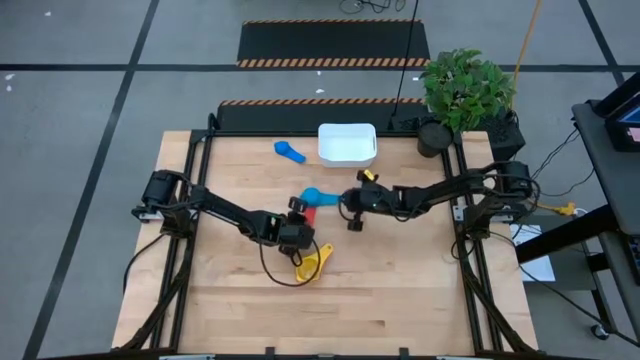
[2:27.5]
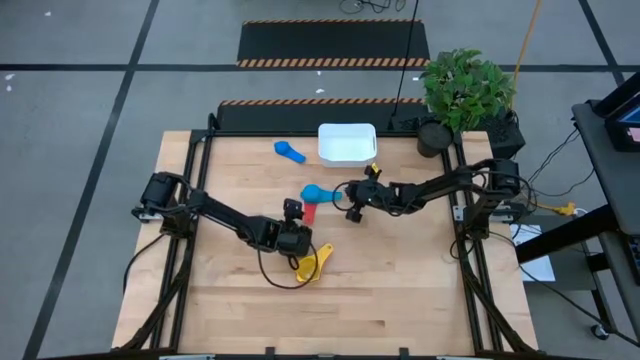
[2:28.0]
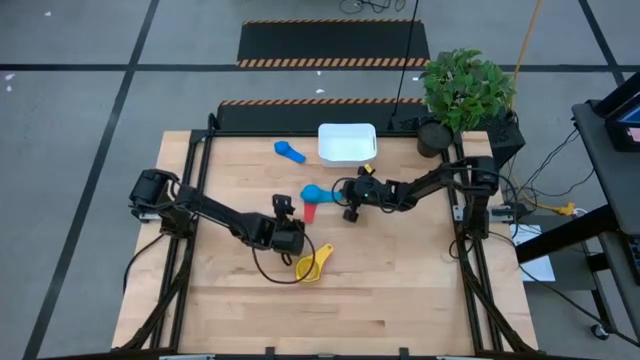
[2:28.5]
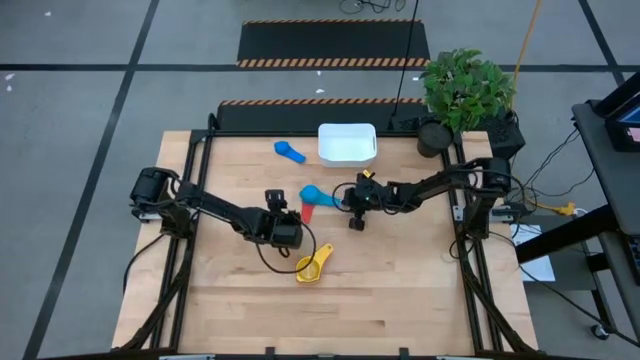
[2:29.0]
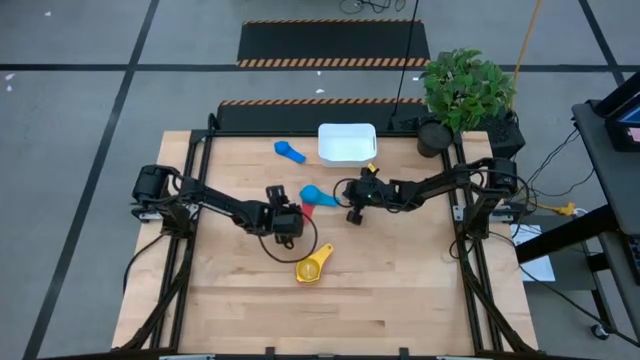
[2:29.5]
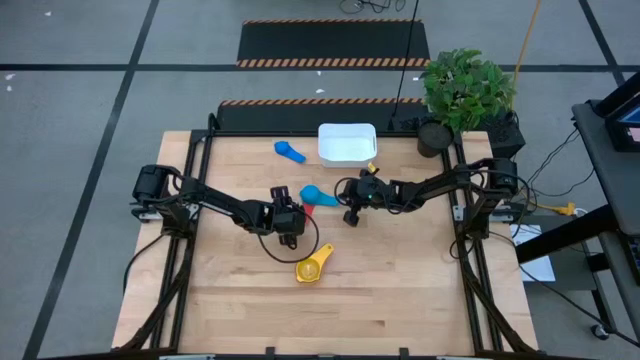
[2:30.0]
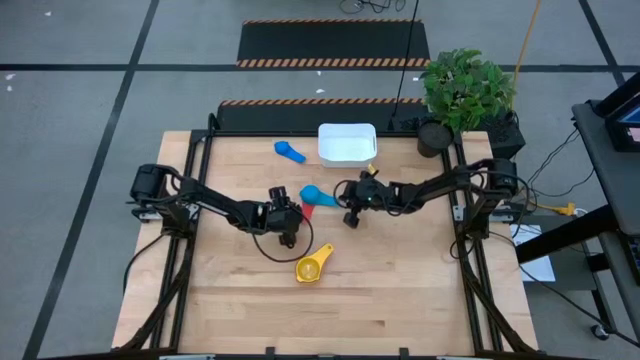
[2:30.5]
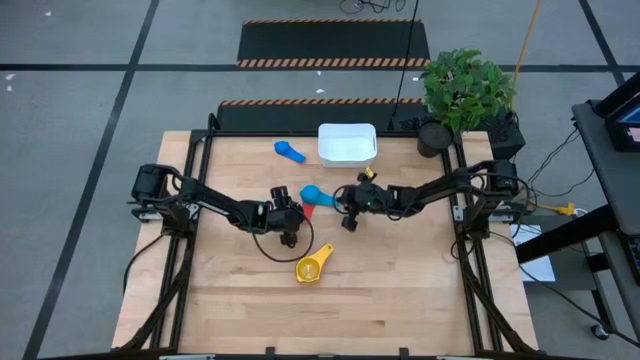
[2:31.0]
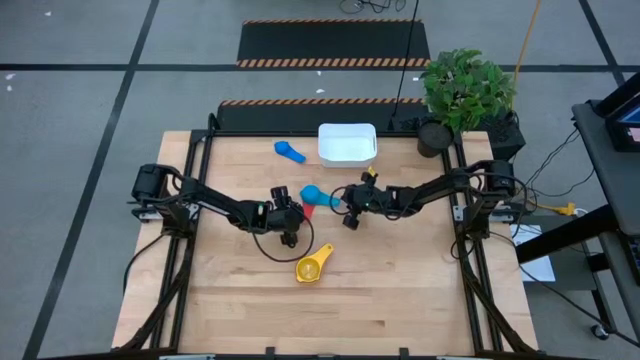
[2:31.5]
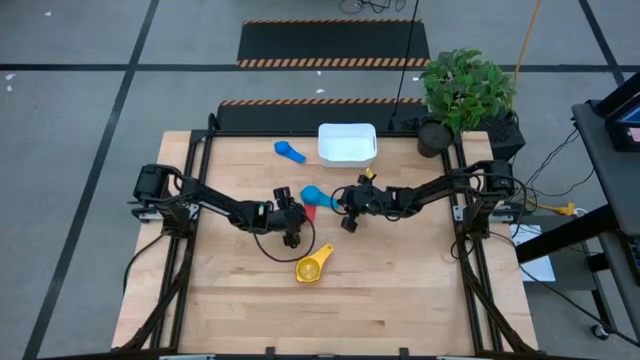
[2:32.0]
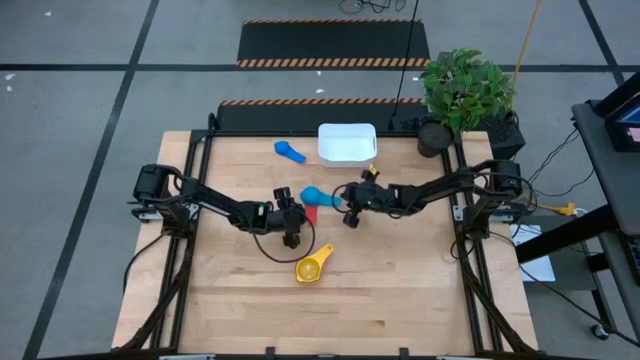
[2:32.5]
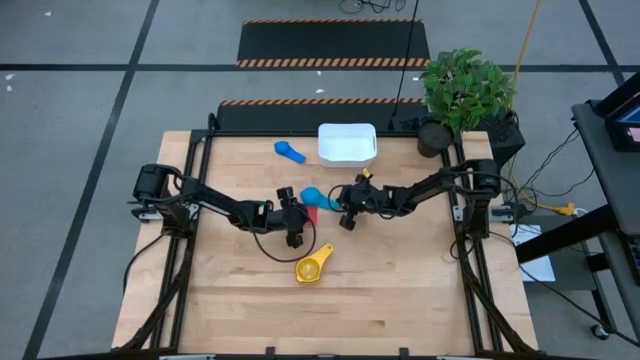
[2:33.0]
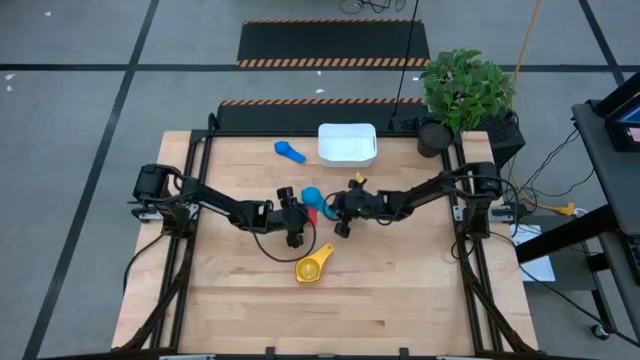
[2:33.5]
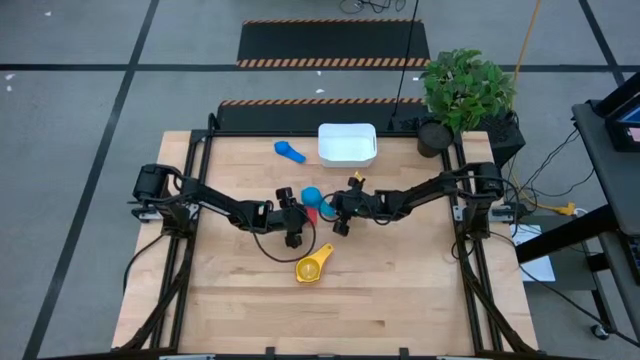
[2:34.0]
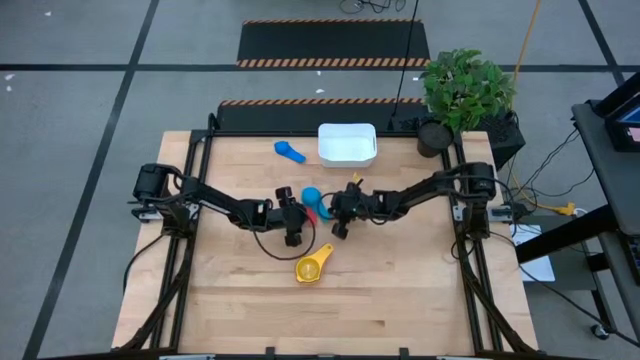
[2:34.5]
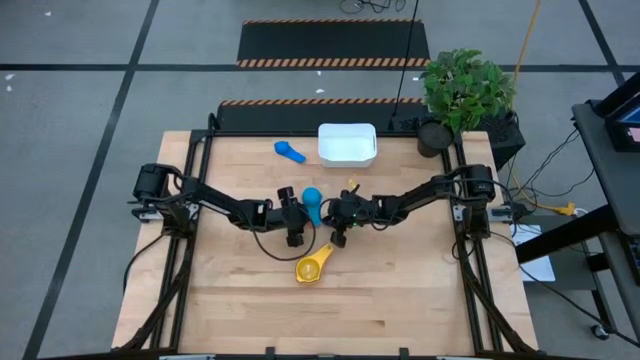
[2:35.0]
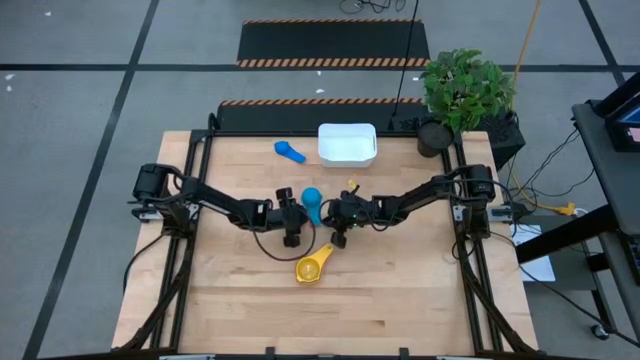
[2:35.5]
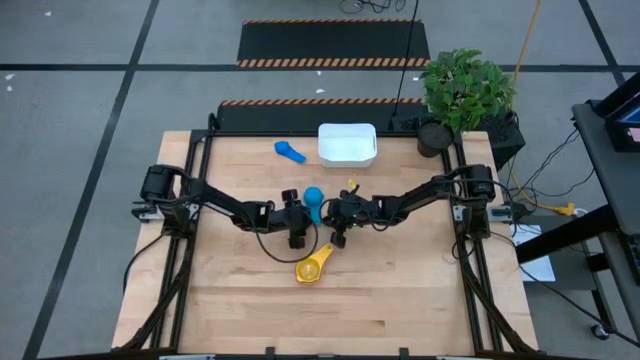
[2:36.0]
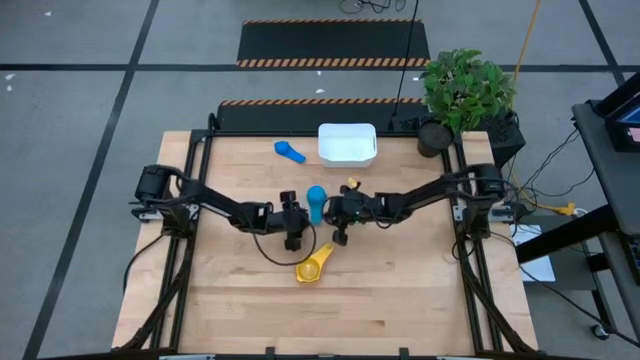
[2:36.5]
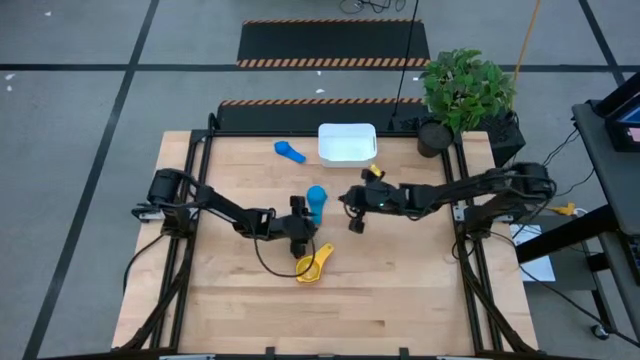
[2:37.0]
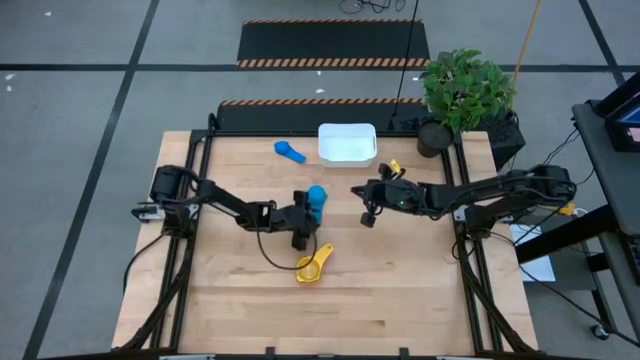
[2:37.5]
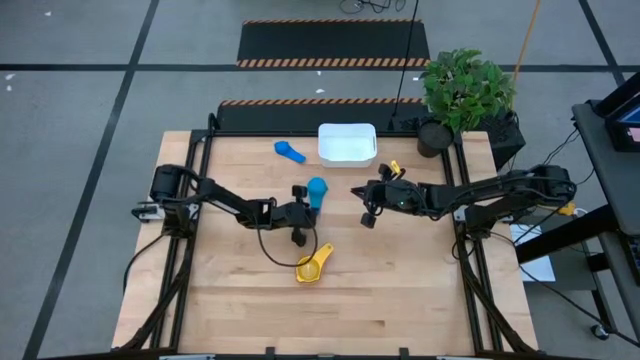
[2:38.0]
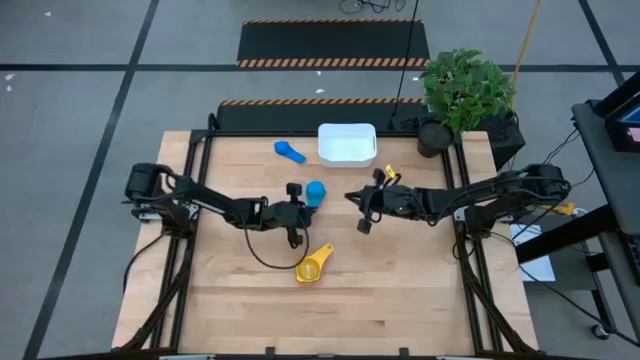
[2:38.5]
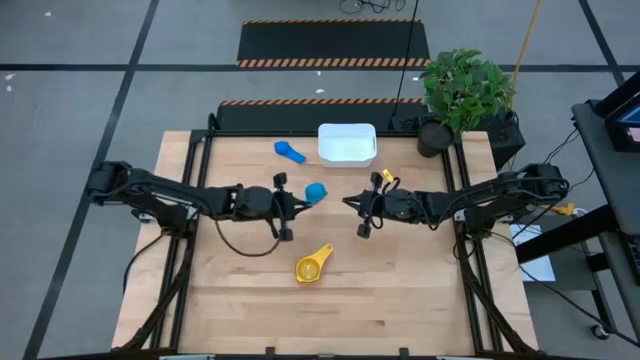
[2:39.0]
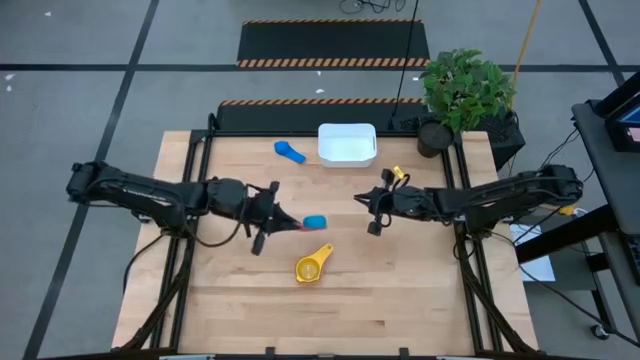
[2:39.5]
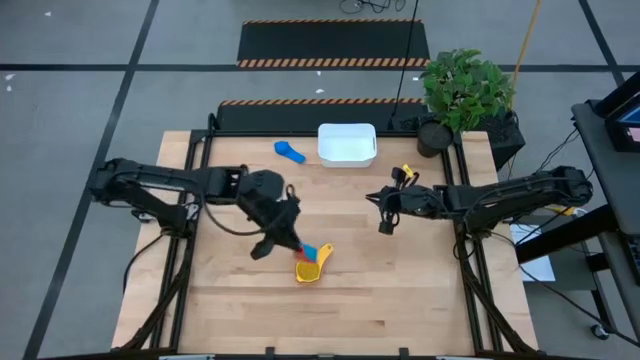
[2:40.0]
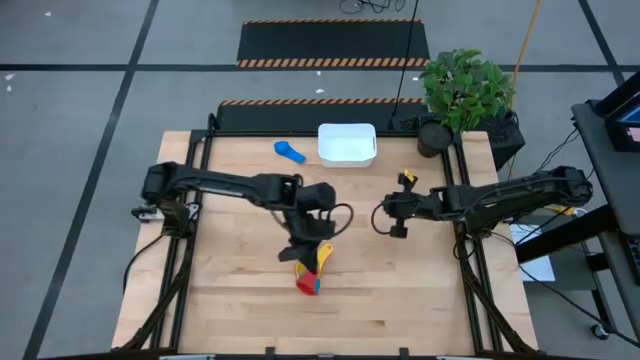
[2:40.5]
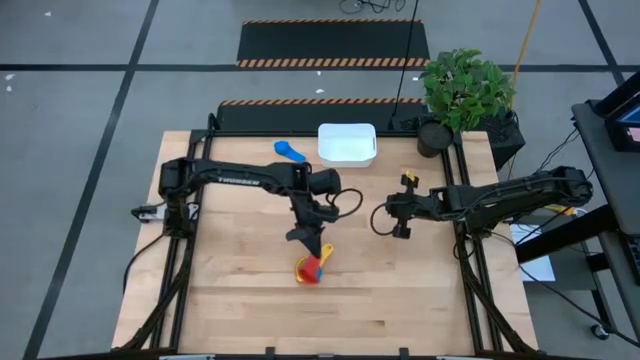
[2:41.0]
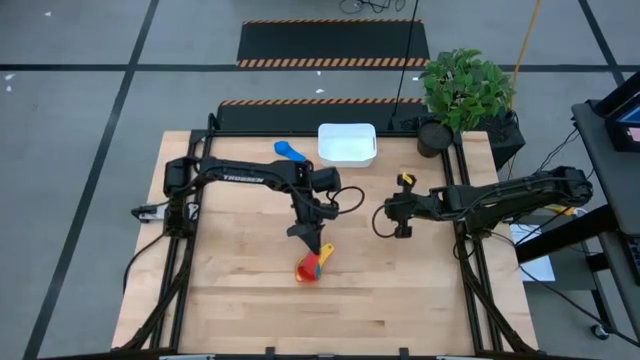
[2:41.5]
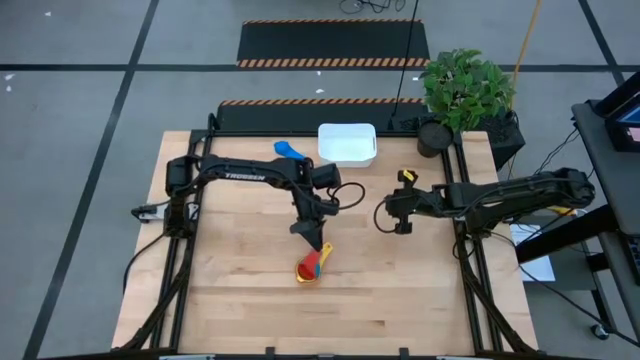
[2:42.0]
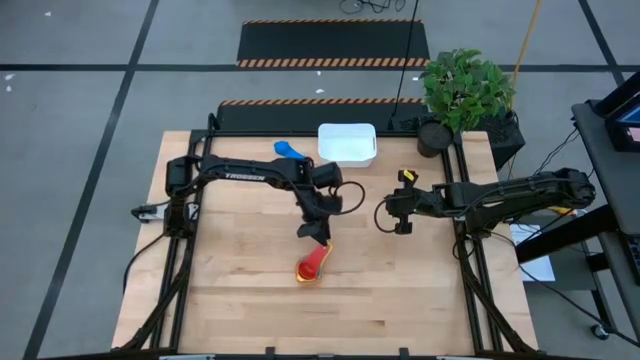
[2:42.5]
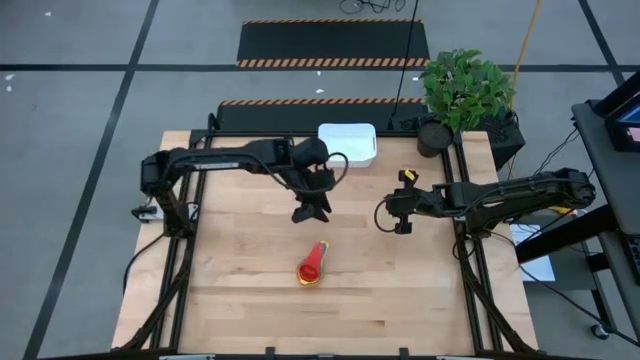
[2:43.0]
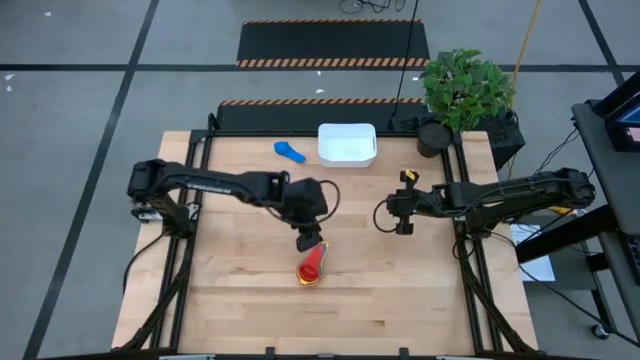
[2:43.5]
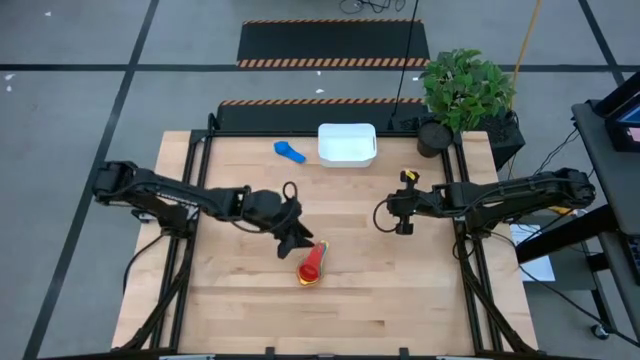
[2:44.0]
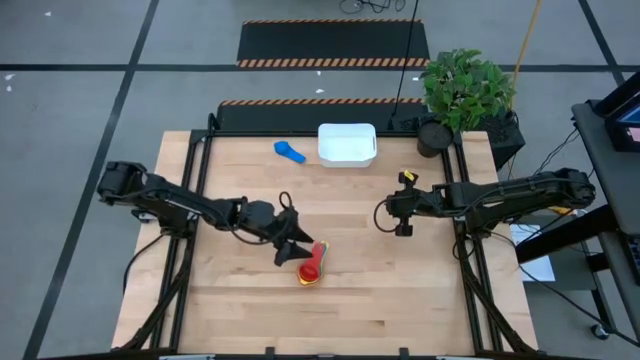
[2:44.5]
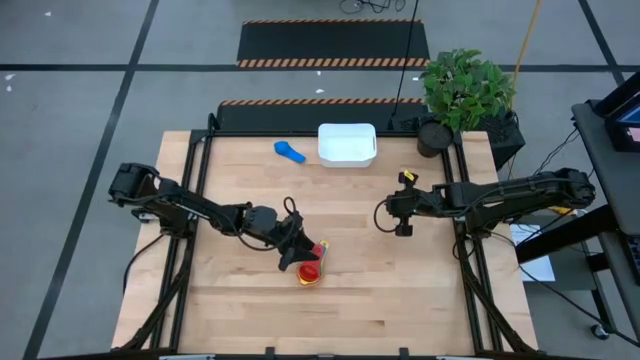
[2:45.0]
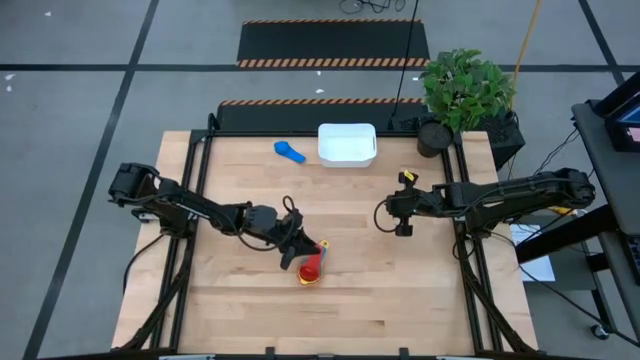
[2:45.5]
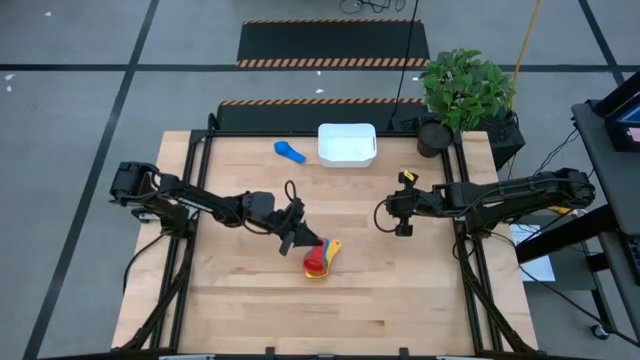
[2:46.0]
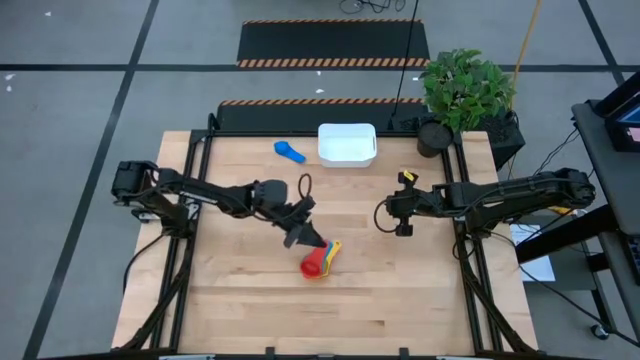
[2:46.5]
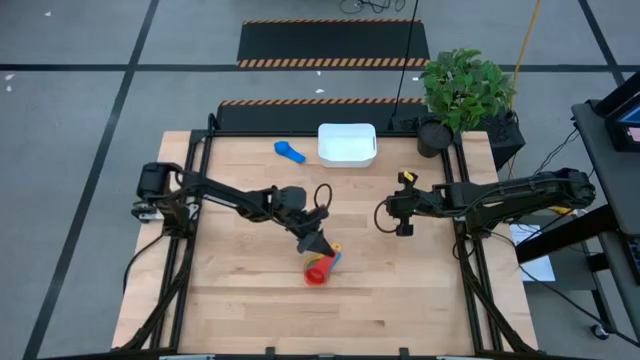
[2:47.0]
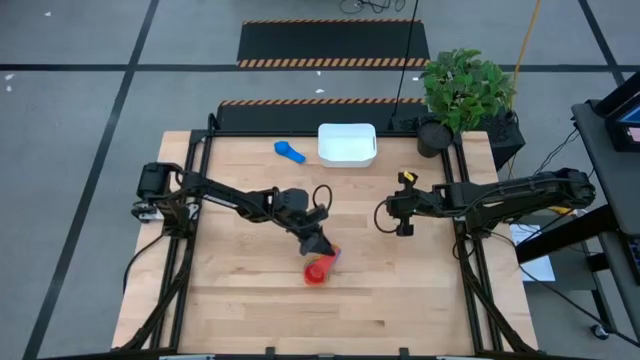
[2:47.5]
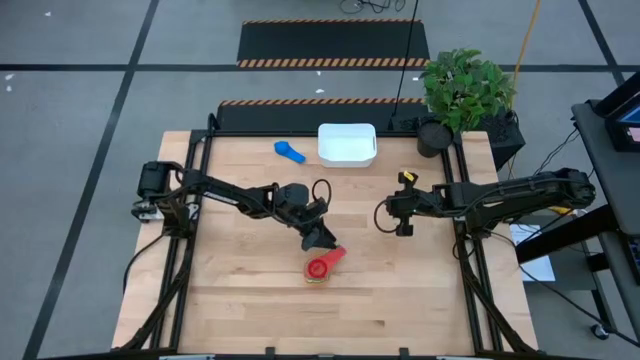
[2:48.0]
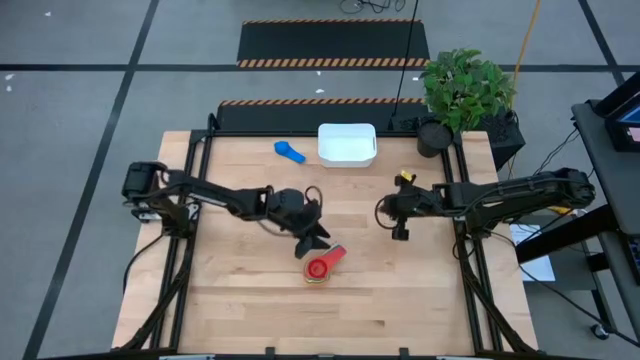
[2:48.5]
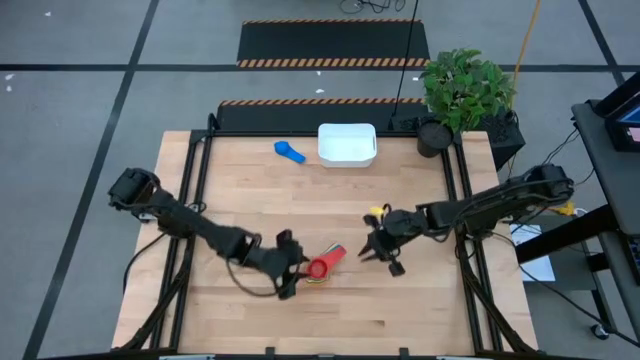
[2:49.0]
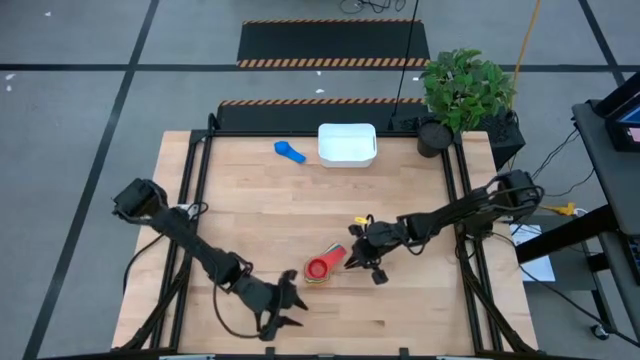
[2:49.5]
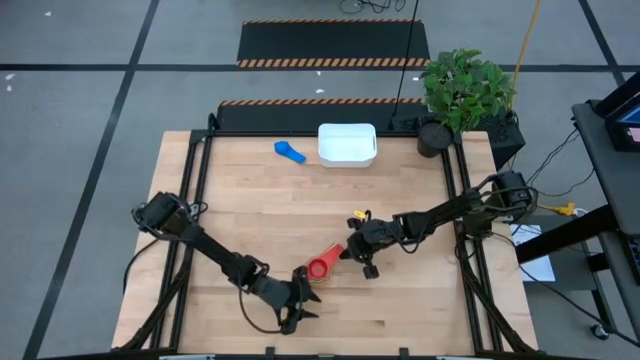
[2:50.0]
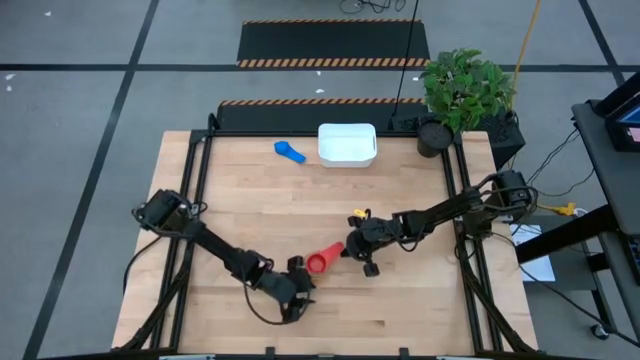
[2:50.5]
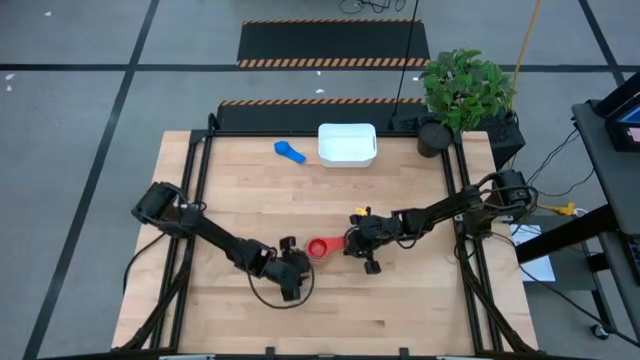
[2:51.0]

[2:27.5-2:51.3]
Task: Nest measuring cups in basket
Stack the stacked measuring cups into the stacked measuring cups
